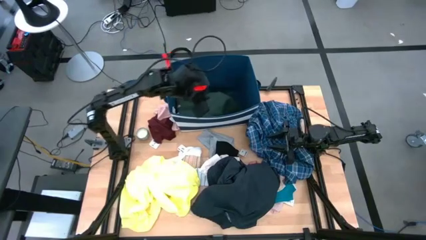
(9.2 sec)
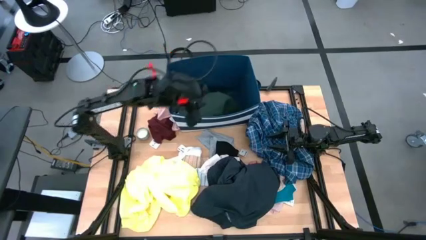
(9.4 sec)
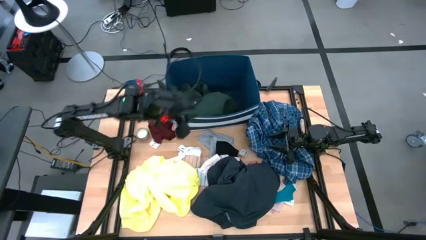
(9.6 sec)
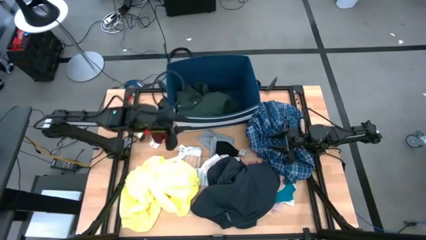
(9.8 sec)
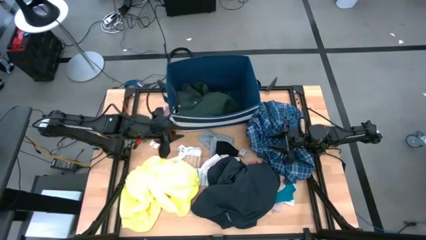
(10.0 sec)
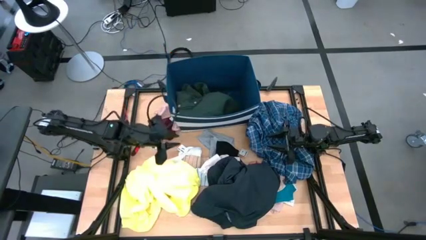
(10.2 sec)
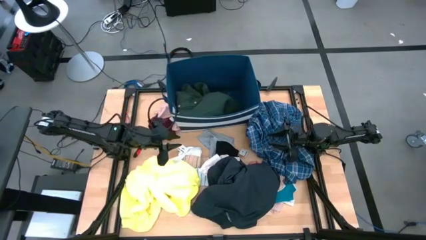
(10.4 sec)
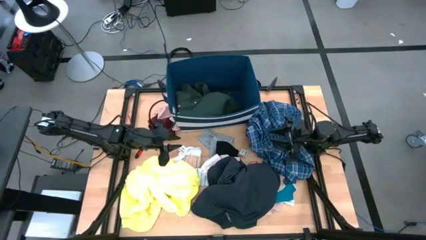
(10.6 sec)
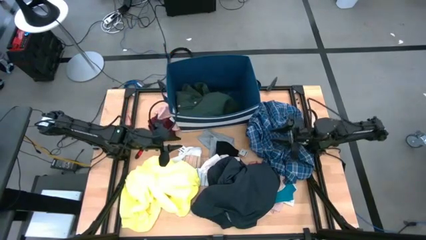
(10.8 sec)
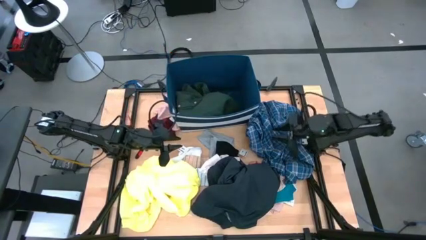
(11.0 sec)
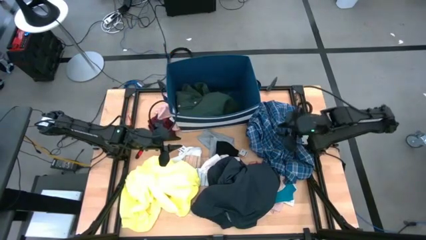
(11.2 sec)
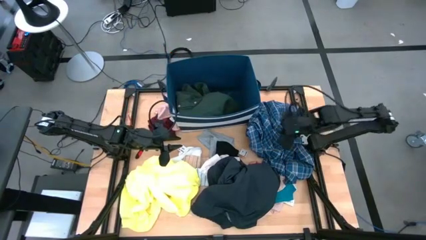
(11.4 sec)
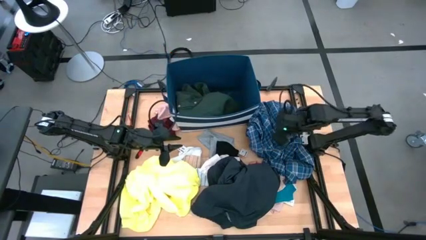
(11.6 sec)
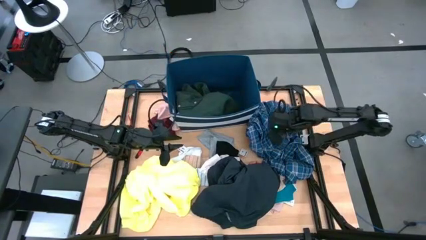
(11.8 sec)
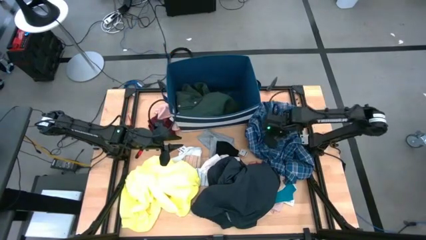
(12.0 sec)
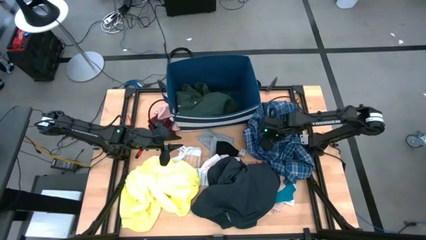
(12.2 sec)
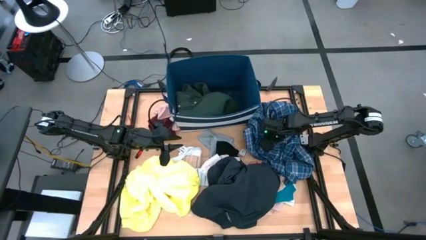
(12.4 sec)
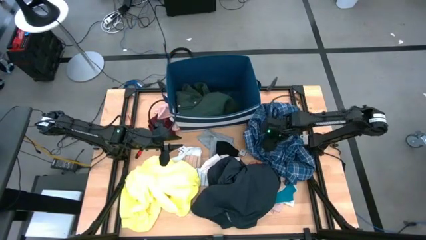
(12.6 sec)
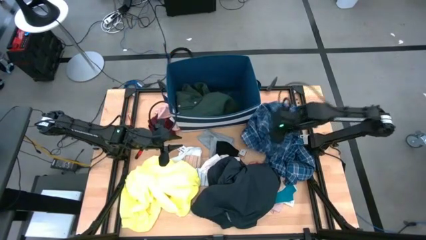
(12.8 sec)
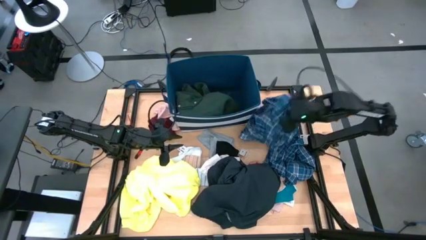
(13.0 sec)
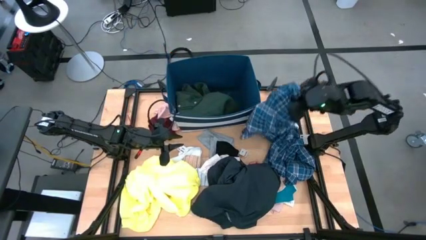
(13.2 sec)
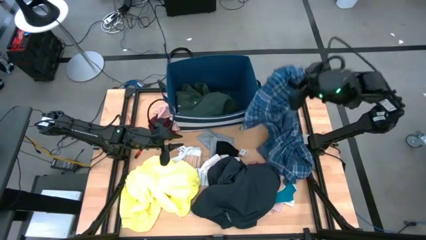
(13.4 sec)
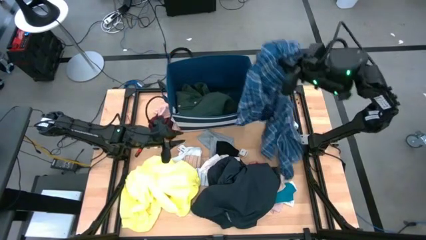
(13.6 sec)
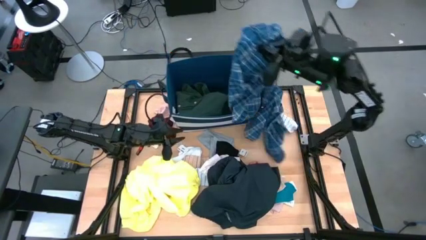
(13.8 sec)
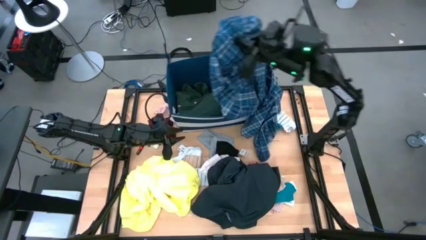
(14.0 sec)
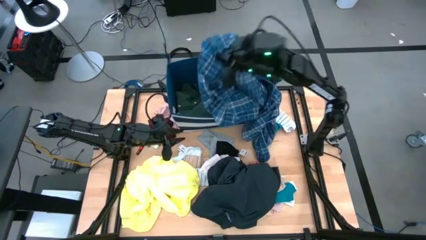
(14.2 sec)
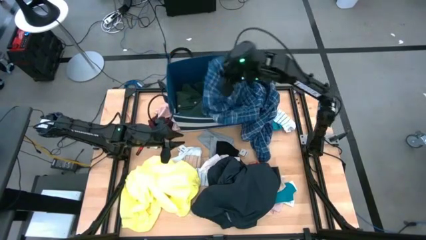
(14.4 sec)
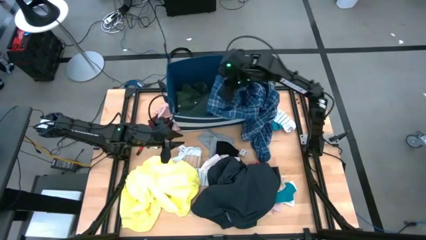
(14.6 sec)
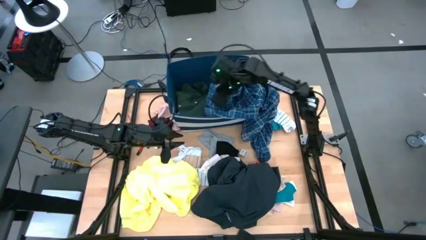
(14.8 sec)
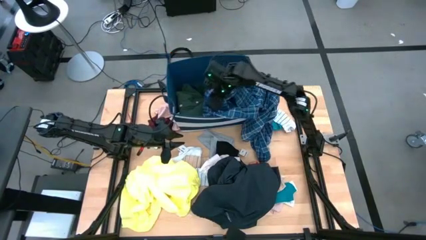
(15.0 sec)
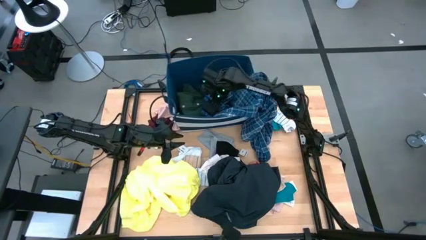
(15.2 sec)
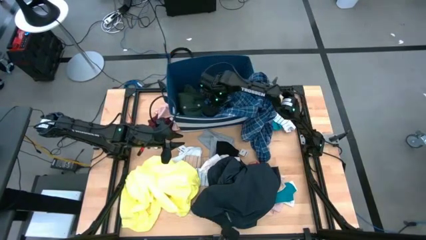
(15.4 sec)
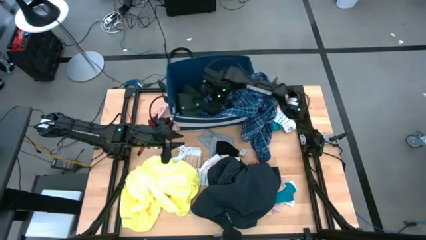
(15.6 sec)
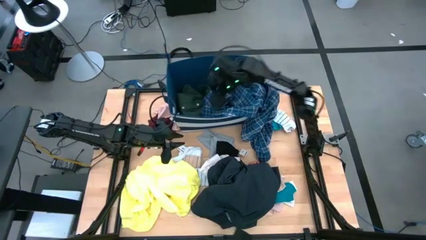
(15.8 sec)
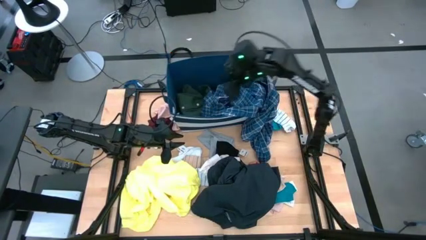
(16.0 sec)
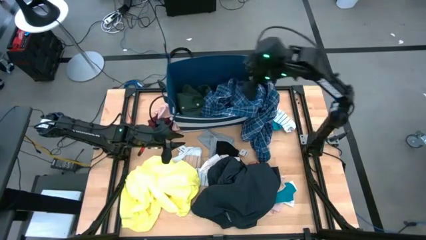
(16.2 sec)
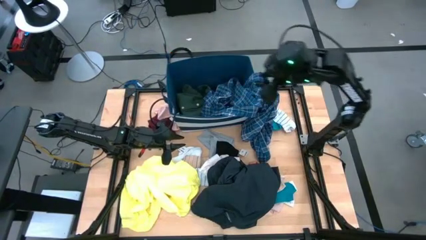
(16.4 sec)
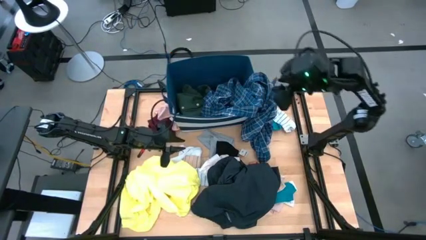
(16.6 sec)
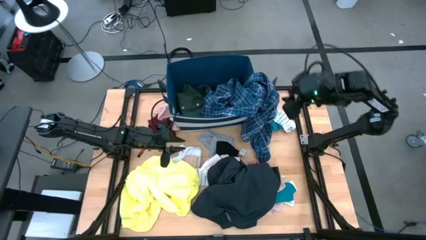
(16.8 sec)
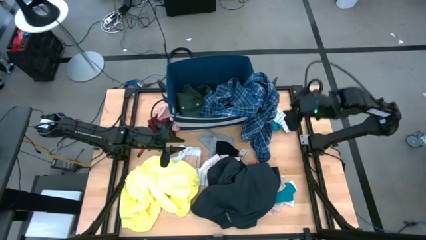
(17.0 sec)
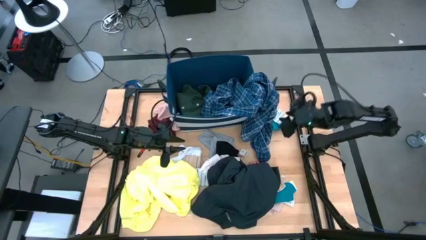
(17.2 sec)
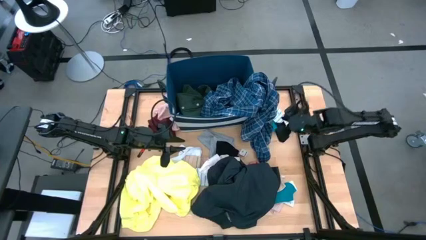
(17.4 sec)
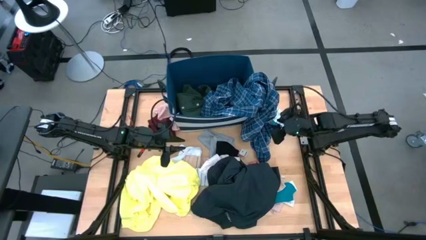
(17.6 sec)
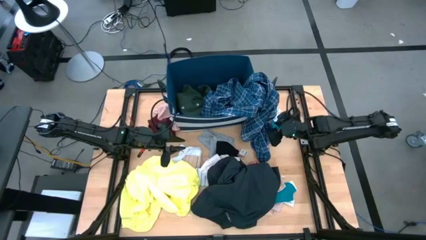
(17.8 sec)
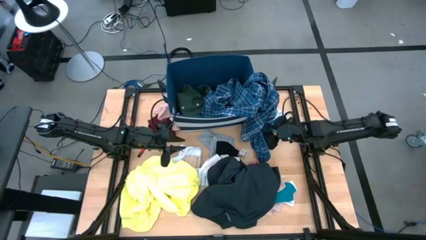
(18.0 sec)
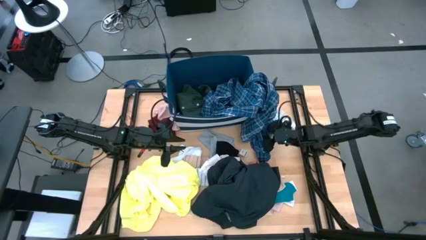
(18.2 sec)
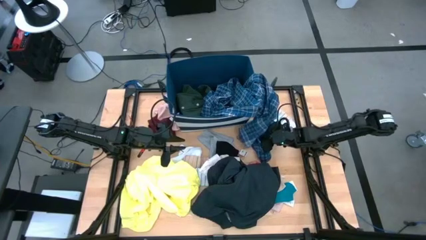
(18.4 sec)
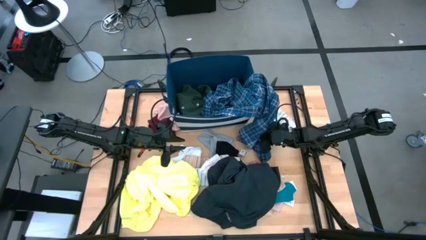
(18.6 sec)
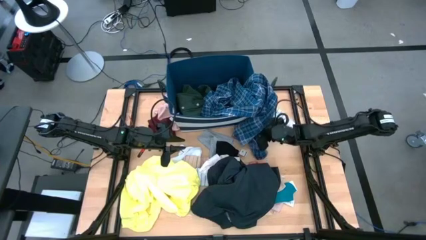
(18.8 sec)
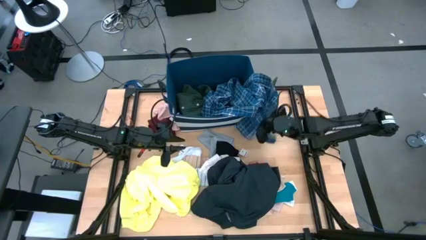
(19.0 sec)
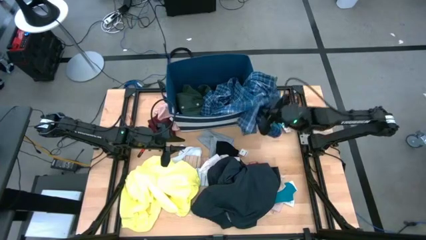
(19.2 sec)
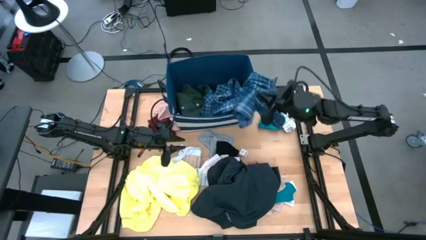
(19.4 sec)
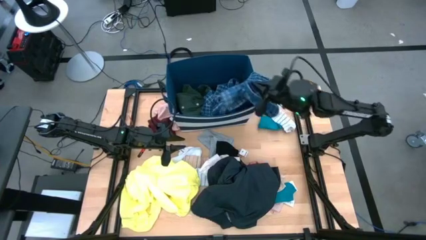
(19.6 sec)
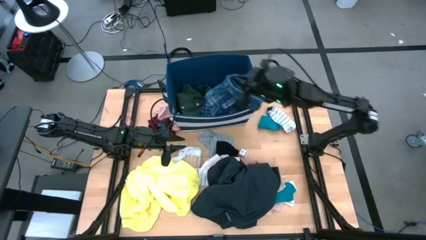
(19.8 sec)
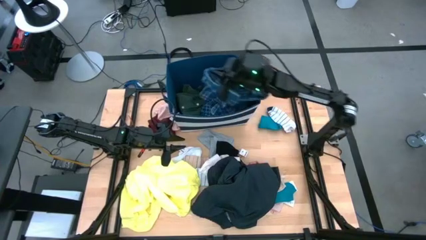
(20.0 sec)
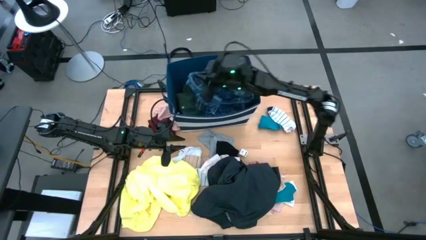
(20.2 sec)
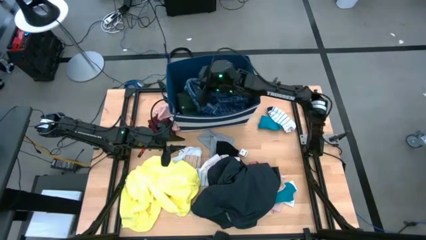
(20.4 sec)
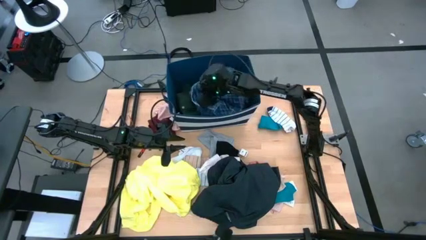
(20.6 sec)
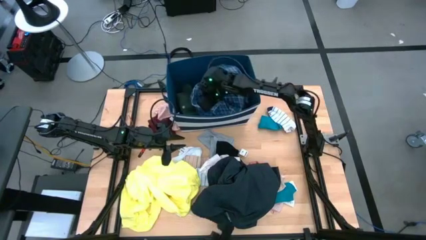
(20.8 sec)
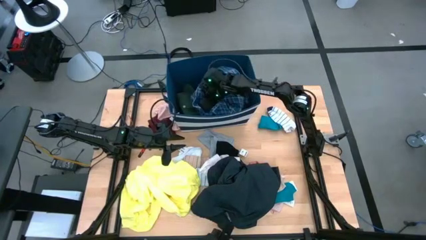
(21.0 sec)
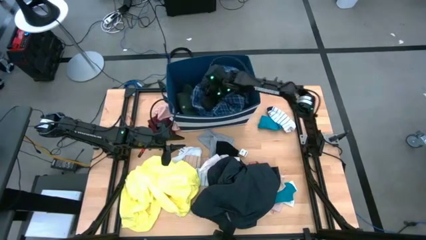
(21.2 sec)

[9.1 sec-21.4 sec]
Task: Sort clothes
Put the blue shirt into the blue laundry bin
